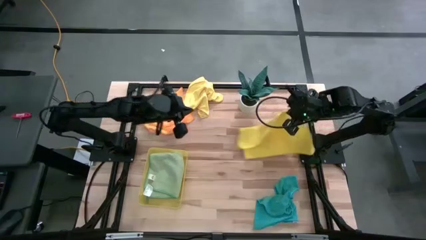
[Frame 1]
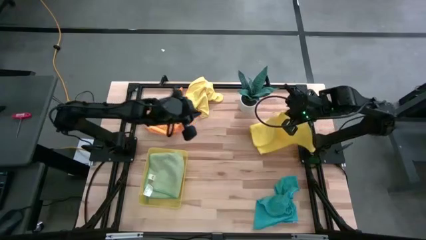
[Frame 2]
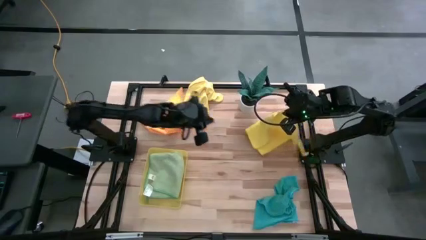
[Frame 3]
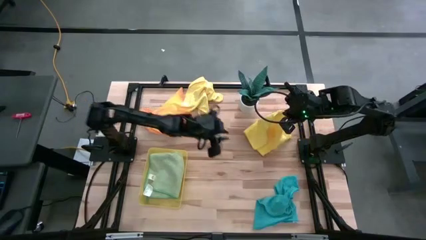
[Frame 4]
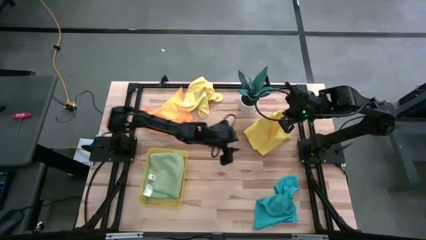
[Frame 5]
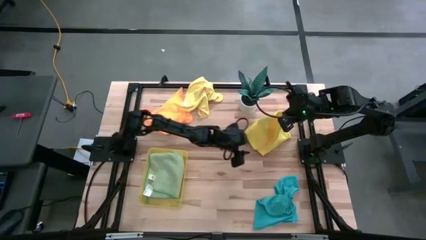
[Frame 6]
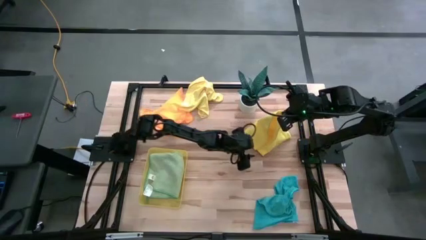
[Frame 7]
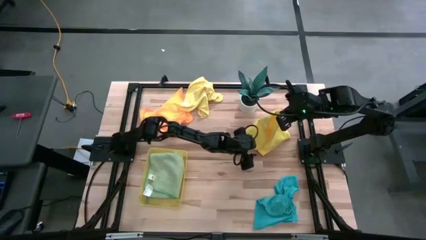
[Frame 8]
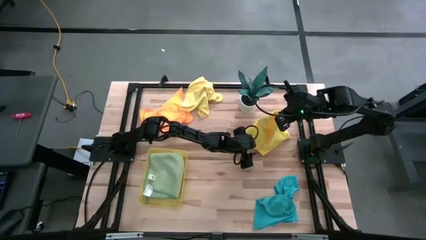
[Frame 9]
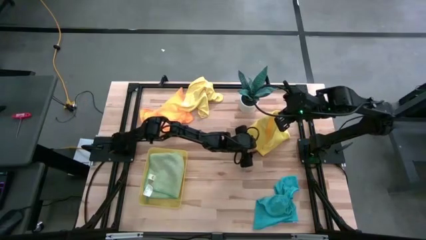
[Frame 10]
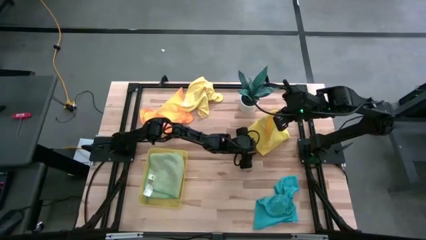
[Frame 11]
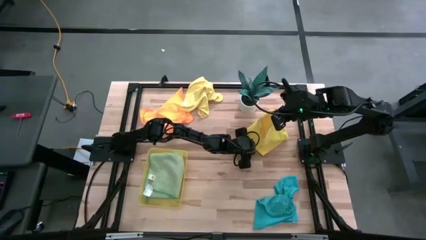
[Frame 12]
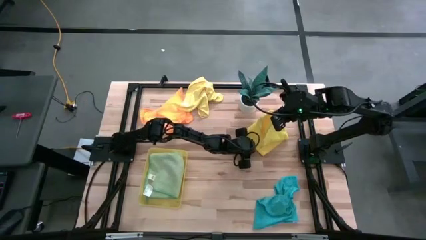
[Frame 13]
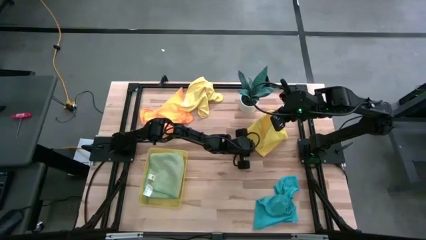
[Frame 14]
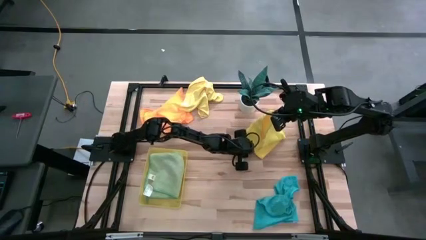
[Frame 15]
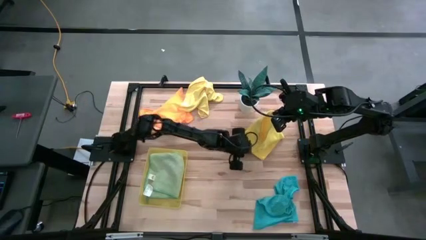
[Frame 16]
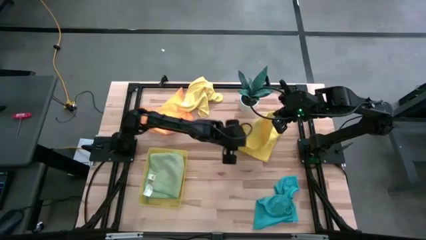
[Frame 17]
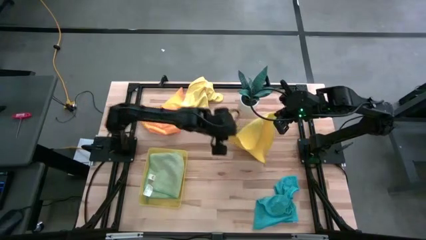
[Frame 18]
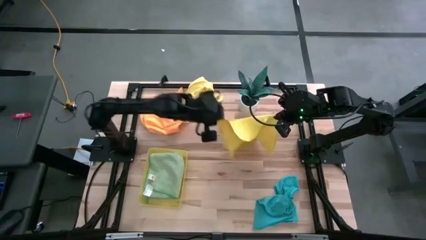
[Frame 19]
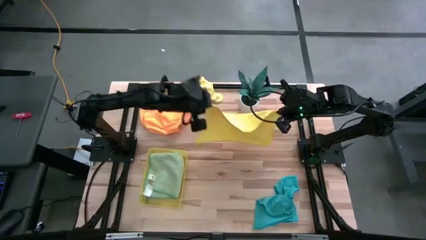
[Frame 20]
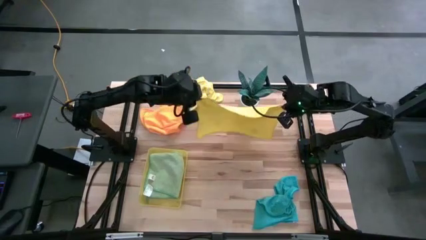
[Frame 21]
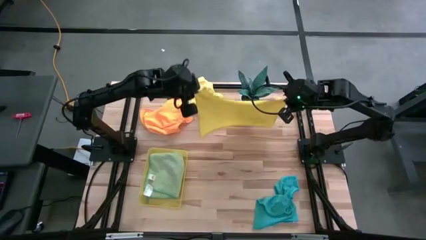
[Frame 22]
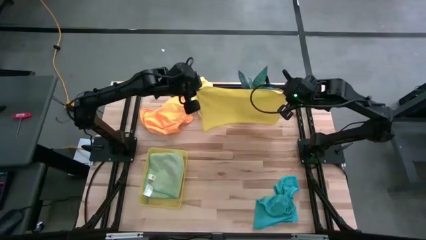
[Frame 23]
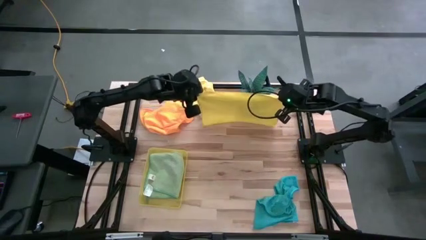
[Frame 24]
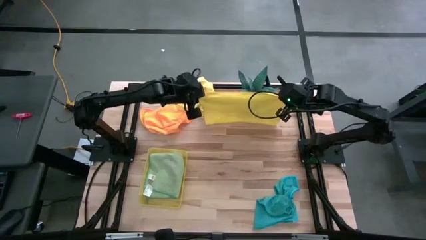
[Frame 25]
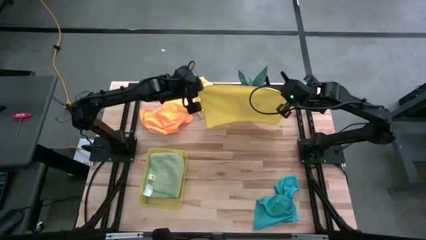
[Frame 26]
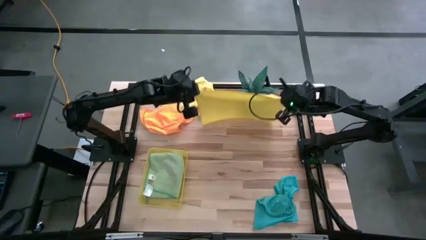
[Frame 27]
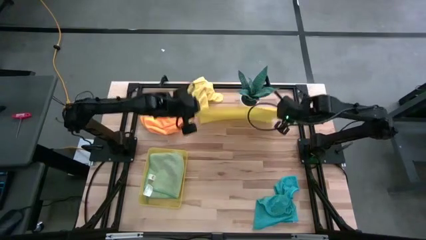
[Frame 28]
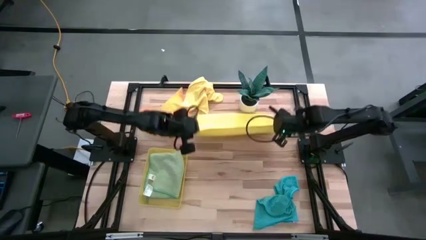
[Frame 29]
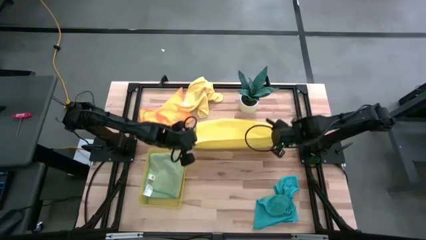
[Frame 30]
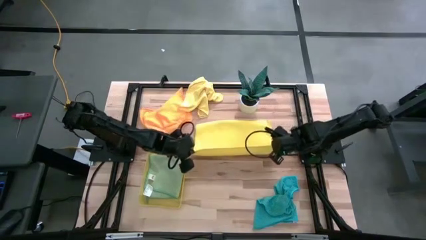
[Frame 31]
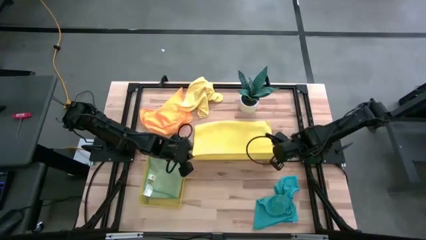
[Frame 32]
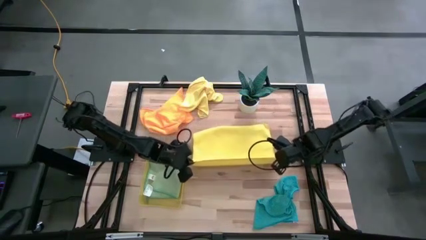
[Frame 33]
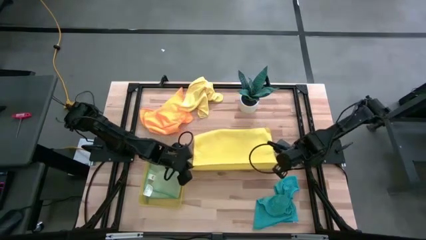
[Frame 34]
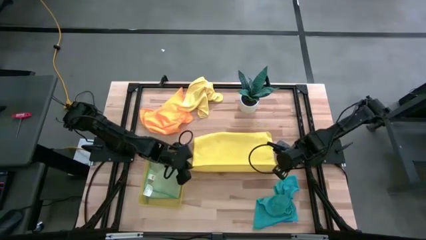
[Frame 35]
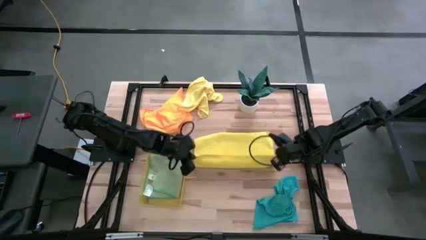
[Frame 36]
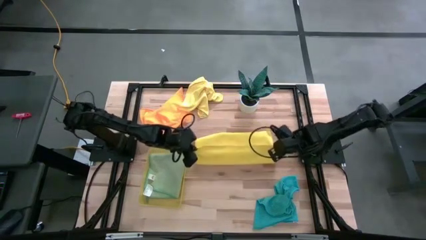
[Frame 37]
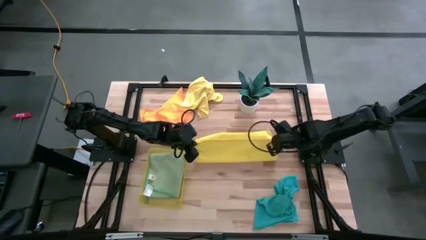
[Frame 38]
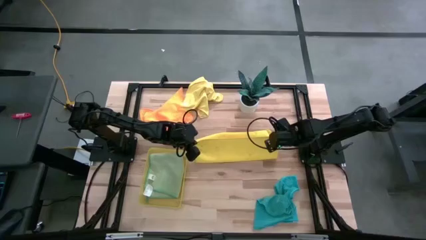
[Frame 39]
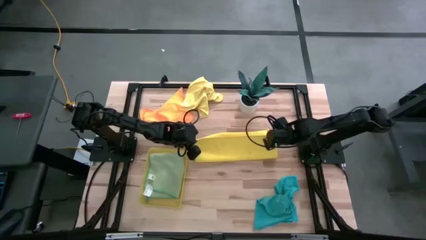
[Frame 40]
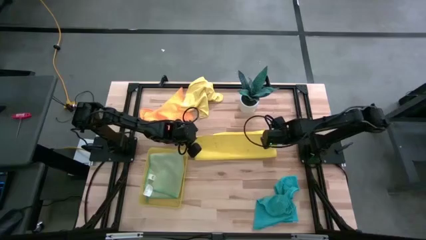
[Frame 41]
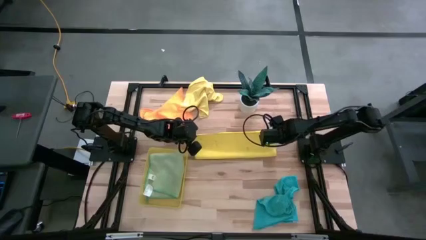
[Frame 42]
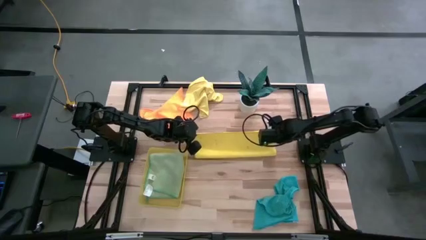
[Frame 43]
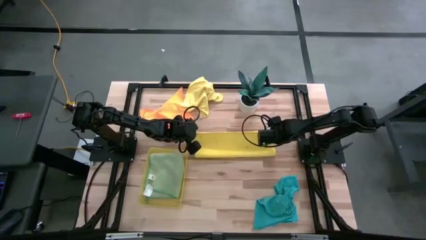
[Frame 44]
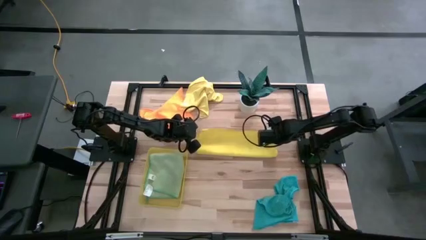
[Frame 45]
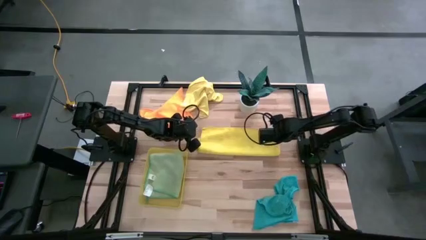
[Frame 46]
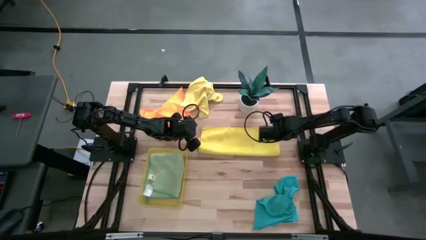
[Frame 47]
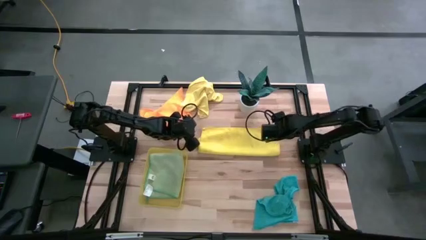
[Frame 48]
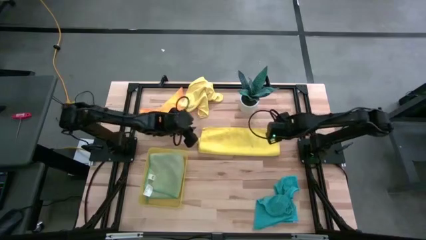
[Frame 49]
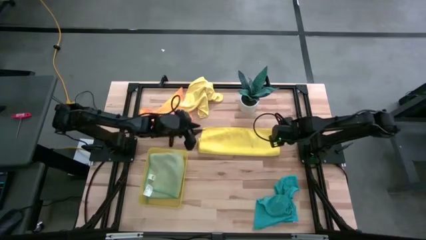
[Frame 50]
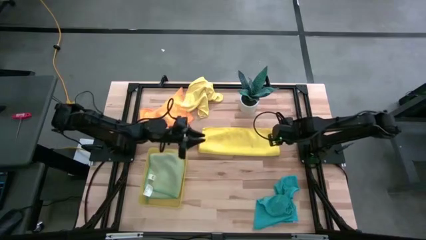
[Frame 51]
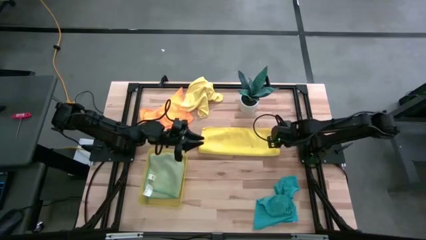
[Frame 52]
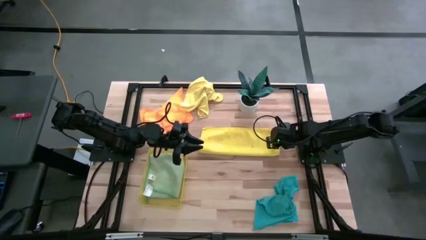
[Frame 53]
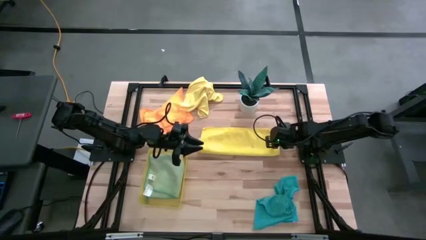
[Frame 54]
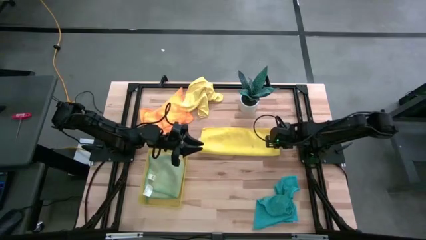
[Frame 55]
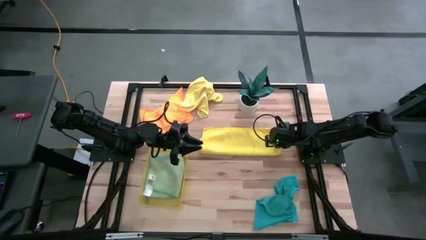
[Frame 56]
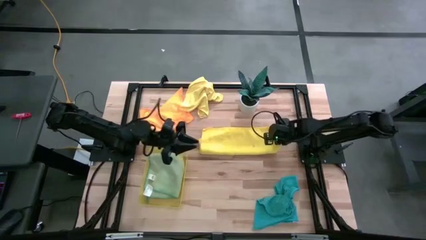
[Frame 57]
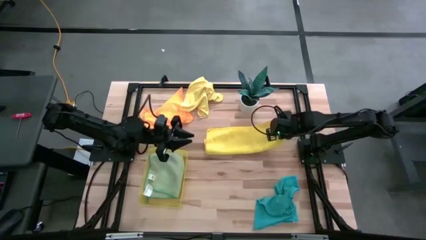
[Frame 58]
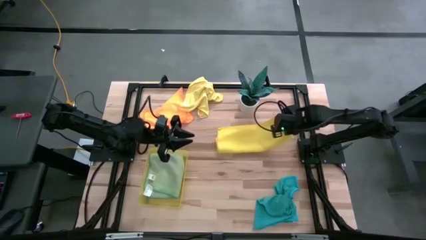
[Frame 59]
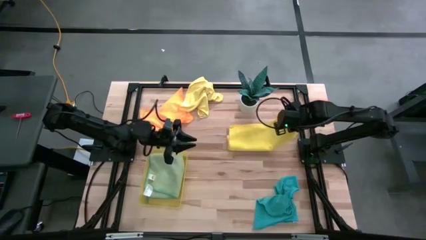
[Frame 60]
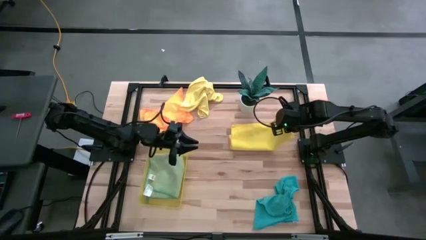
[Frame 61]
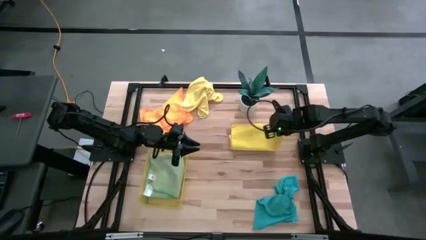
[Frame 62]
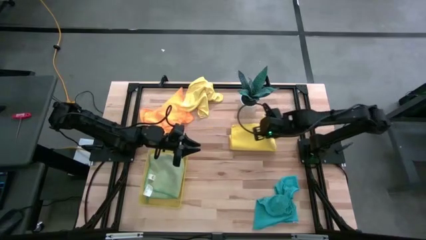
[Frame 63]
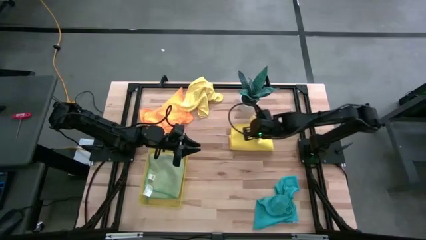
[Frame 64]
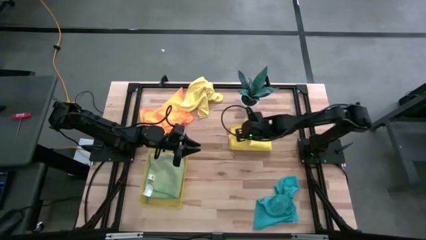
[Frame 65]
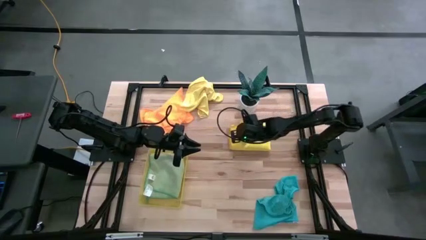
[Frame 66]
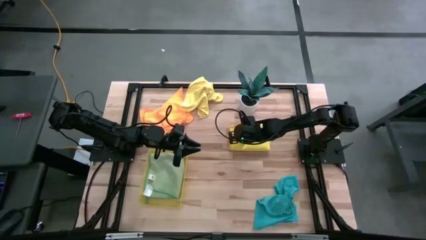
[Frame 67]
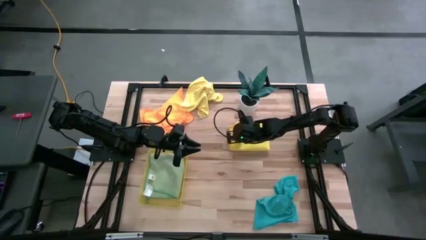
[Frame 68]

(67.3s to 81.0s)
Task: Fold microfiber towels
Fold the bottom yellow microfiber cloth
